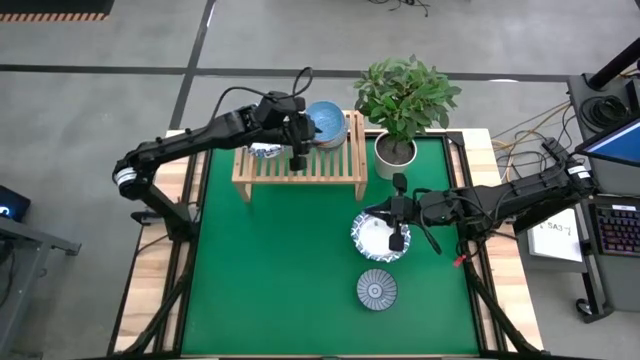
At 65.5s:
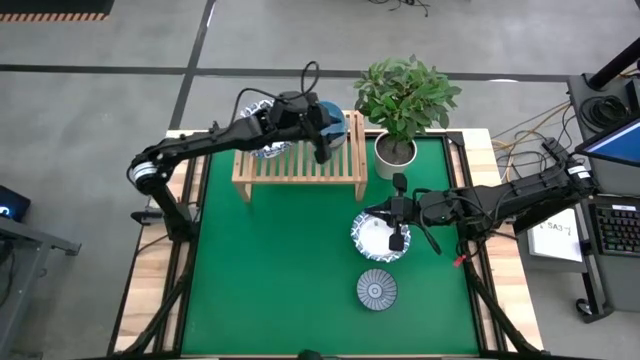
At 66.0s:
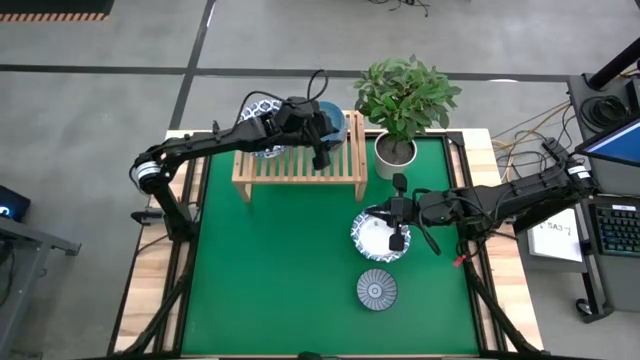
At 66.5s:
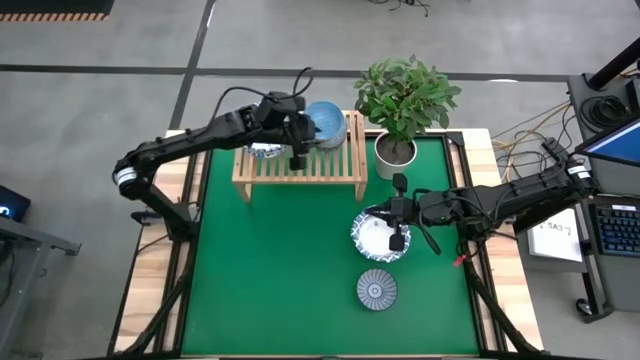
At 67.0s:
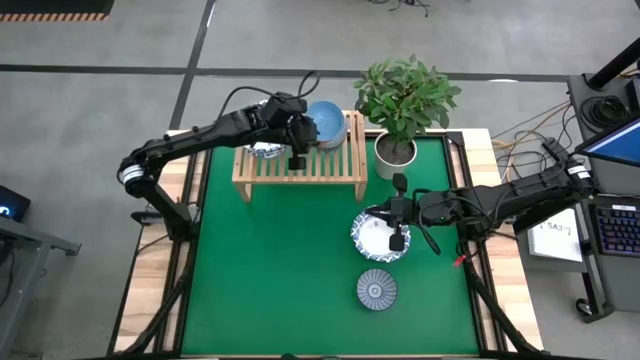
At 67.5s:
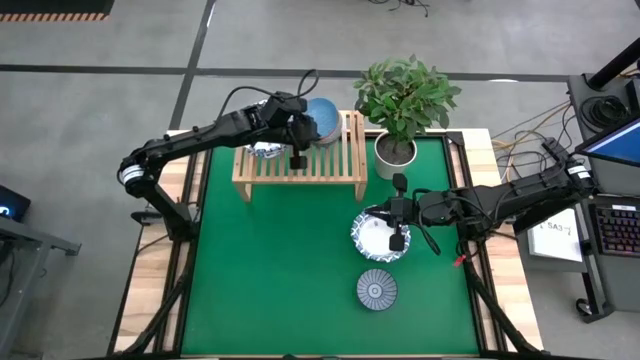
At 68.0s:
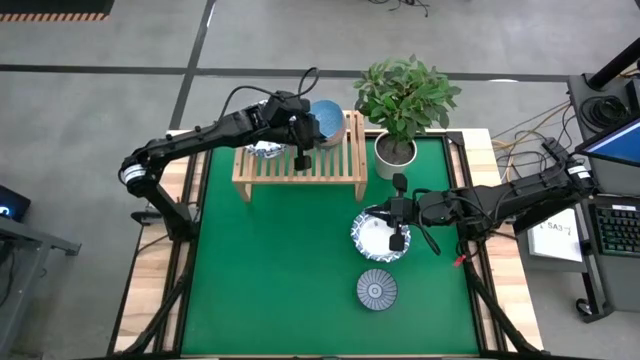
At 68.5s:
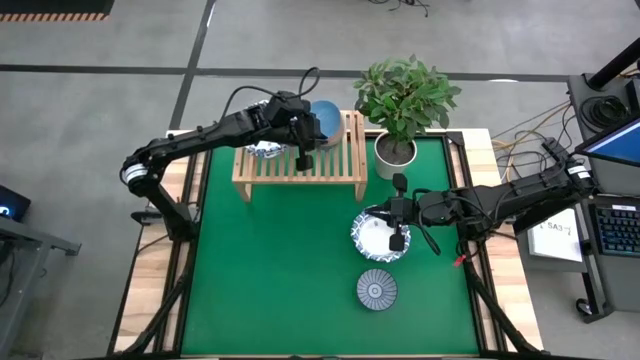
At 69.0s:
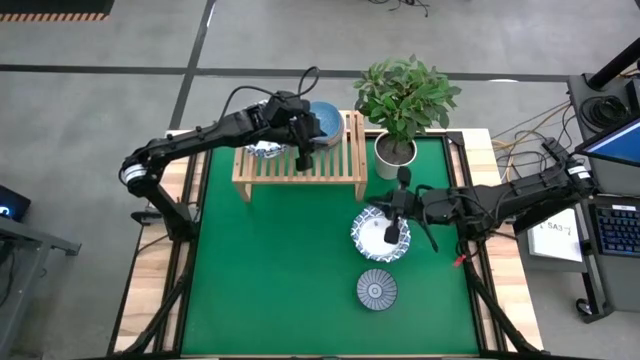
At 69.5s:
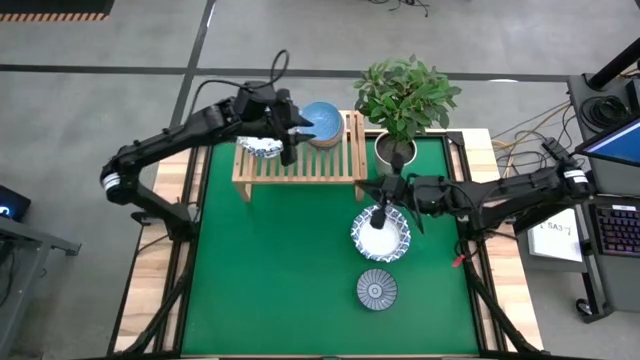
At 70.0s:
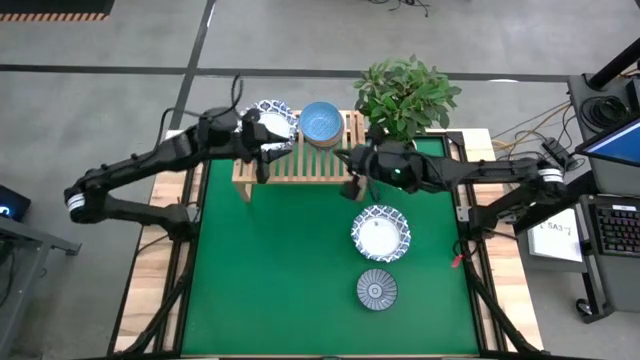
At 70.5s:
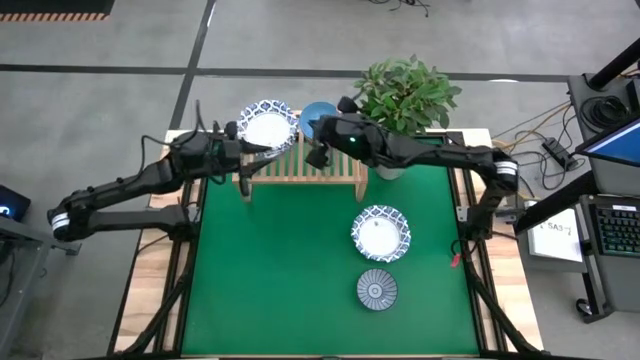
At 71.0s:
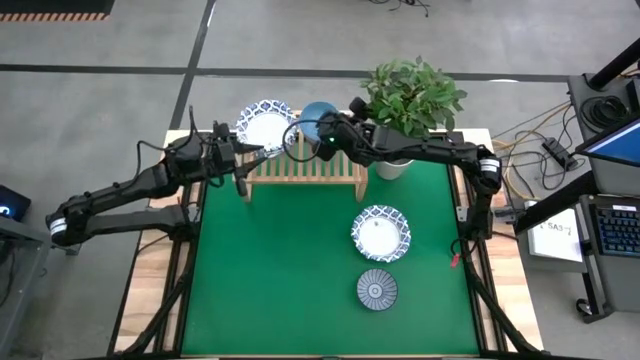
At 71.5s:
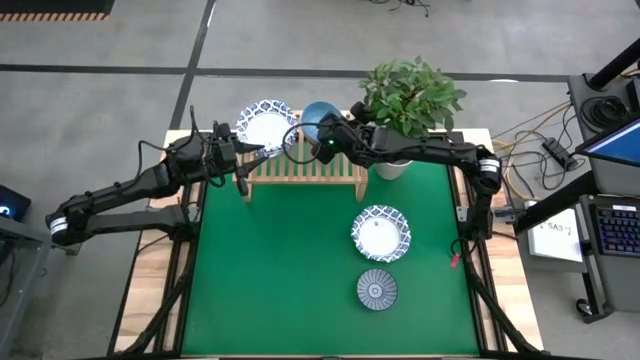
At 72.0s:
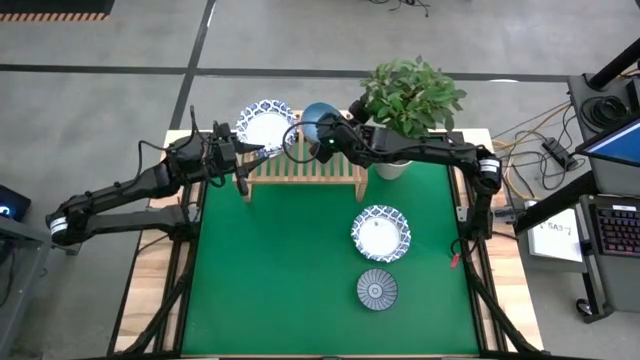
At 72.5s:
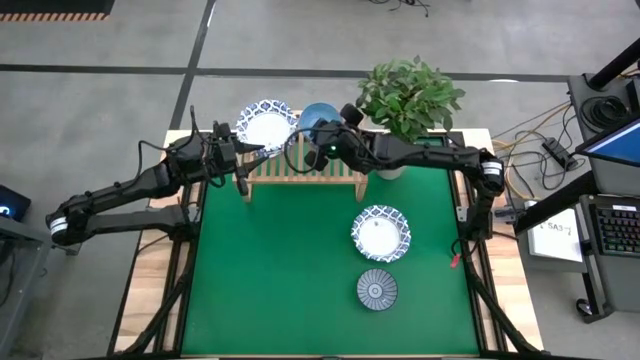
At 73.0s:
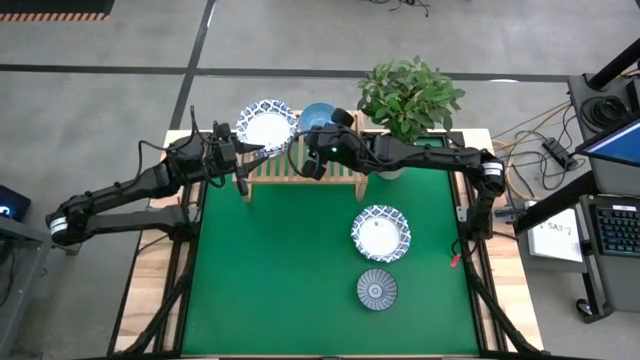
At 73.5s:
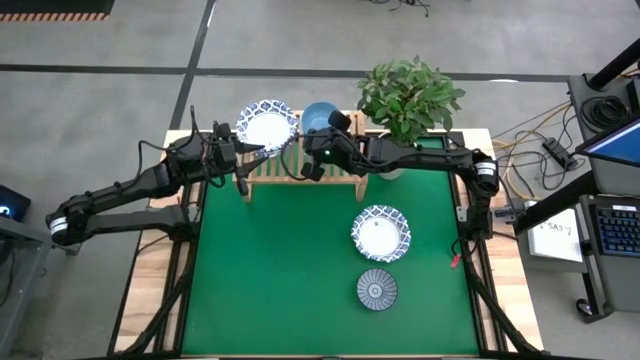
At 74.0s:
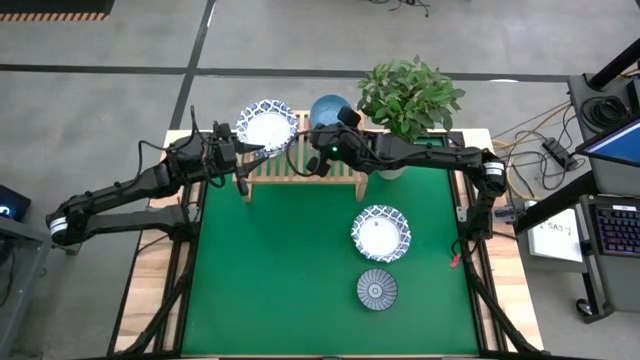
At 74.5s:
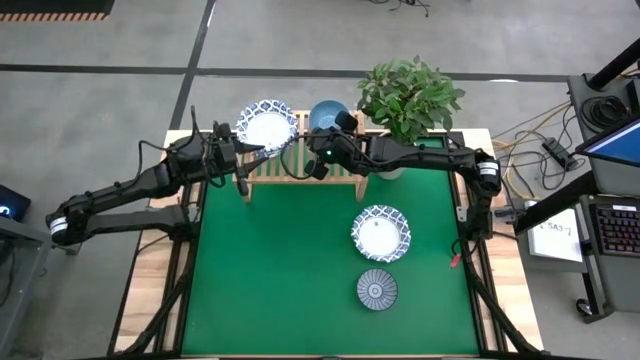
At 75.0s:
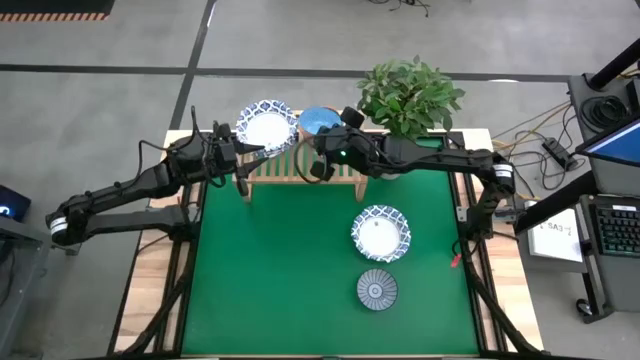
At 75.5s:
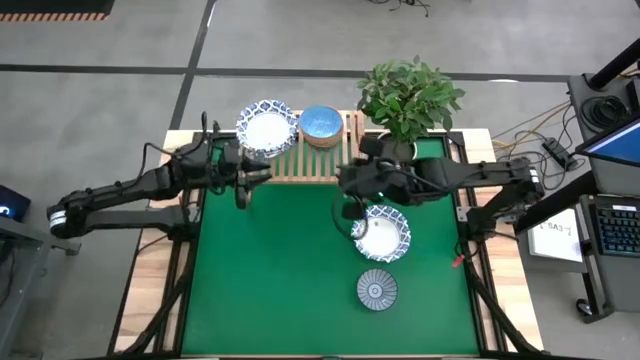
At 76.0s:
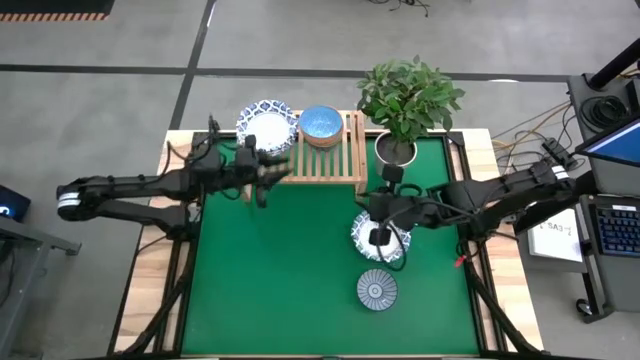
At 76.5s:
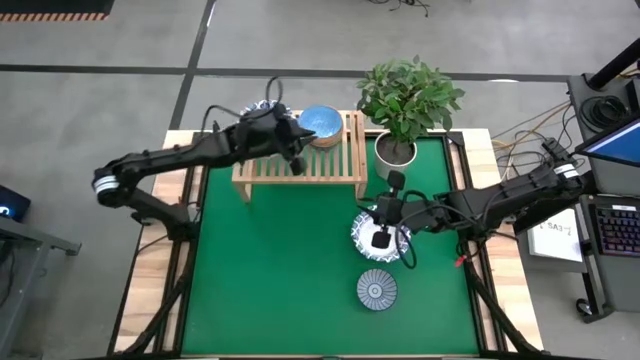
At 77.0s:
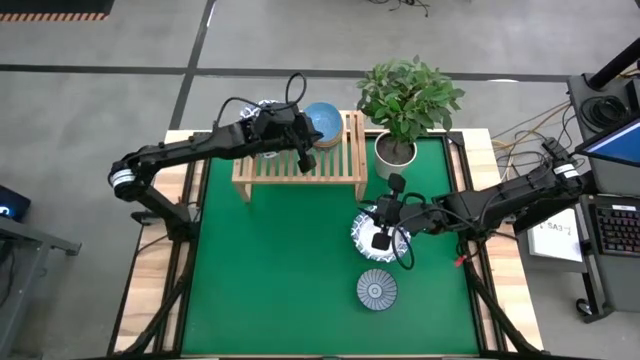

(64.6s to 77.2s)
Task: Place and stack bowls onto a shelf
Stack the light blue bowl on top of the orange bowl on the shelf

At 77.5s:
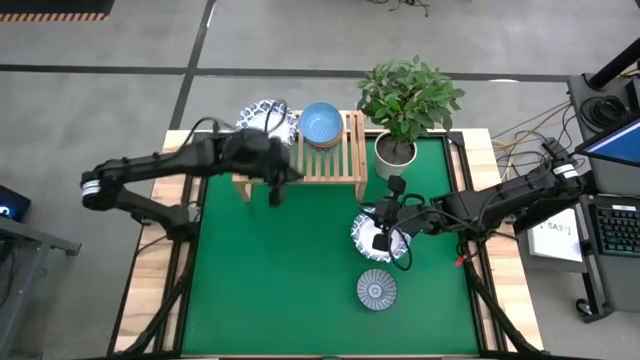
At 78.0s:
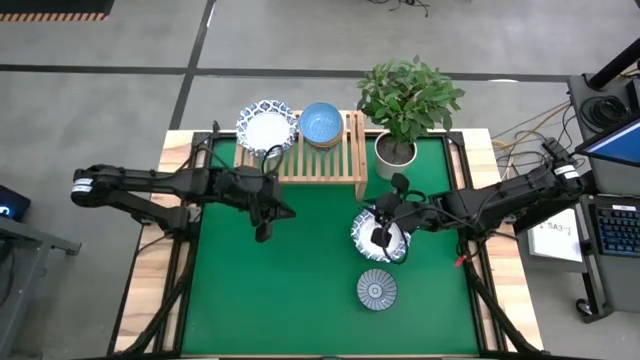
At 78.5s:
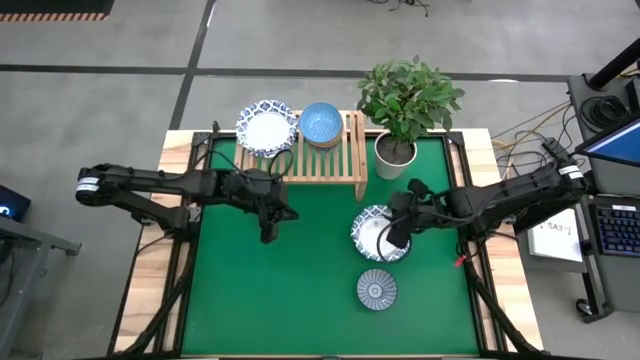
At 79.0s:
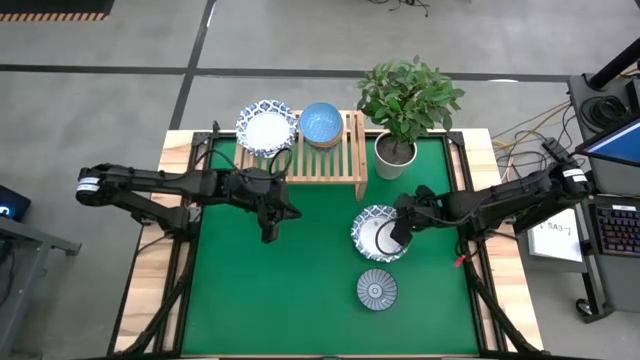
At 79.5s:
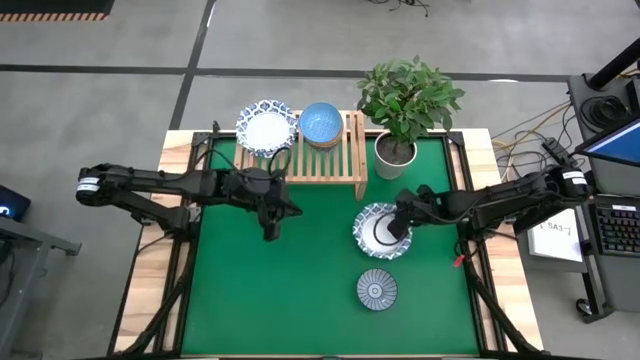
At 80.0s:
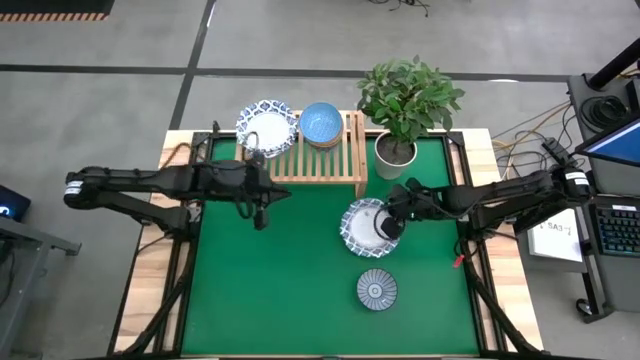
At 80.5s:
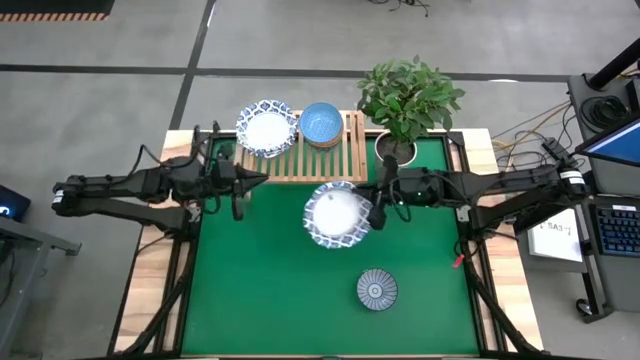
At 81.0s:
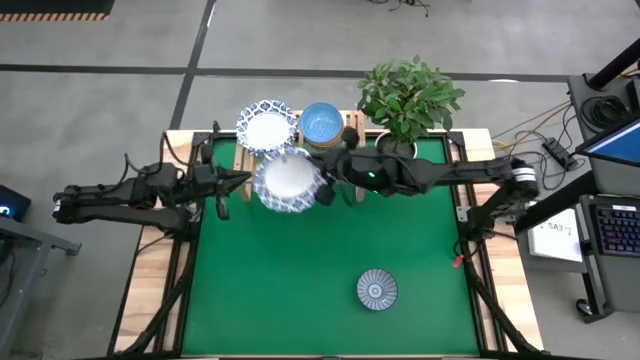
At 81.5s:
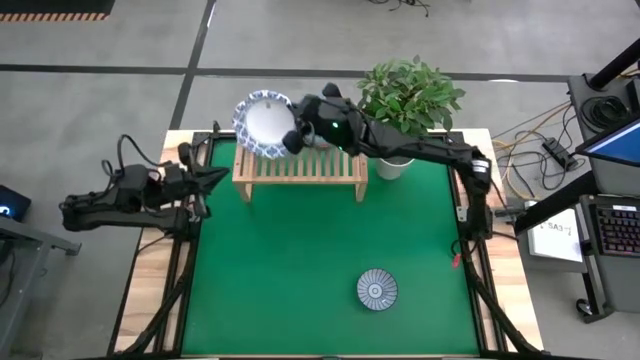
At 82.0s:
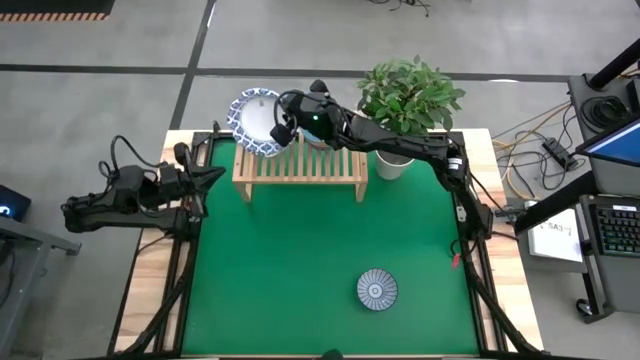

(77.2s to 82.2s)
Stack the white bowl on top of the other white bowl on the shelf

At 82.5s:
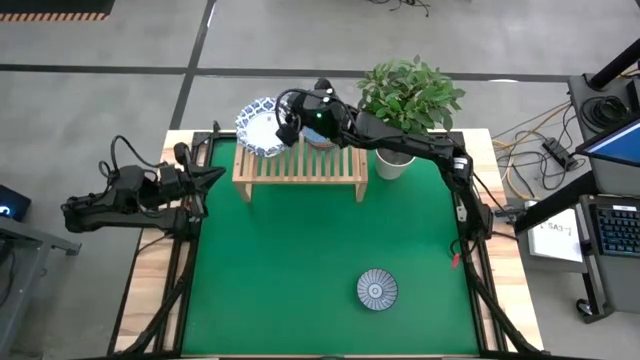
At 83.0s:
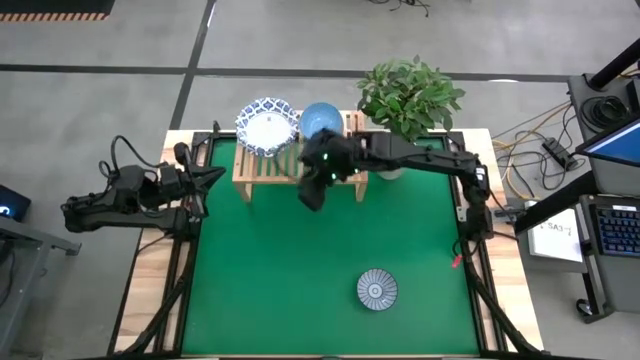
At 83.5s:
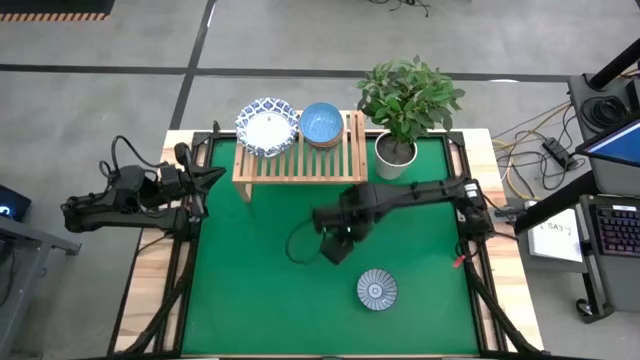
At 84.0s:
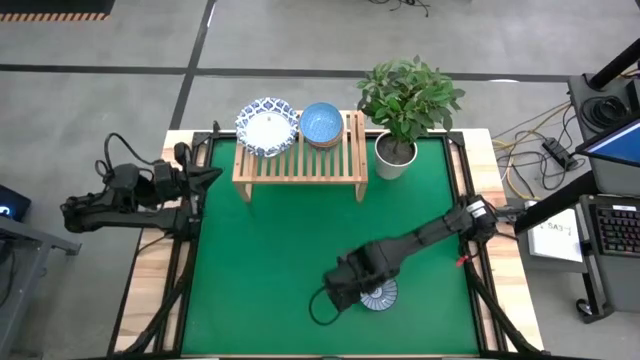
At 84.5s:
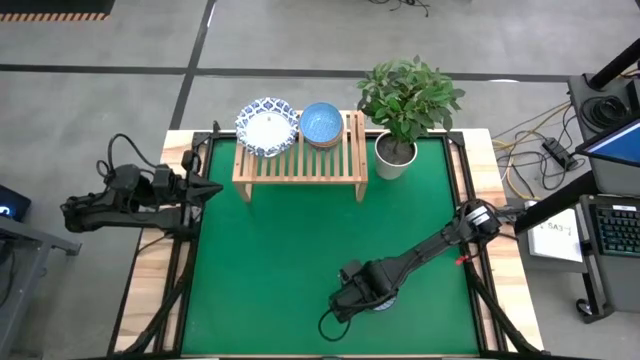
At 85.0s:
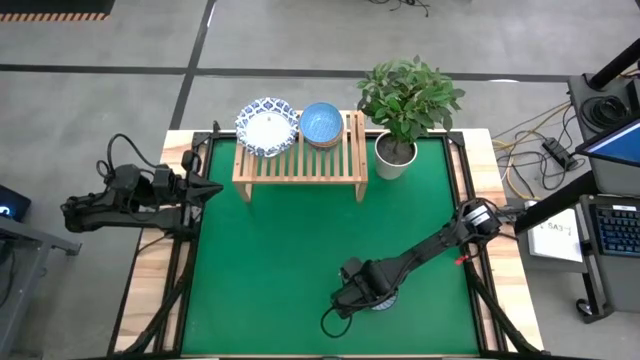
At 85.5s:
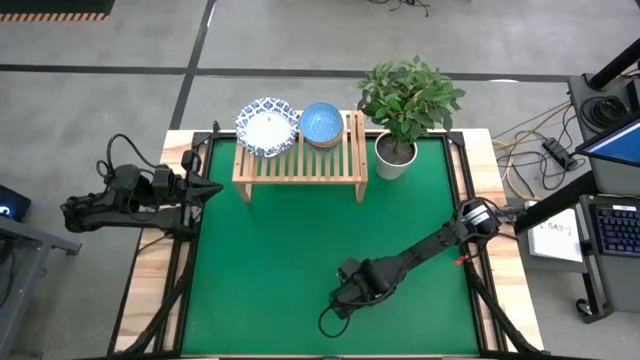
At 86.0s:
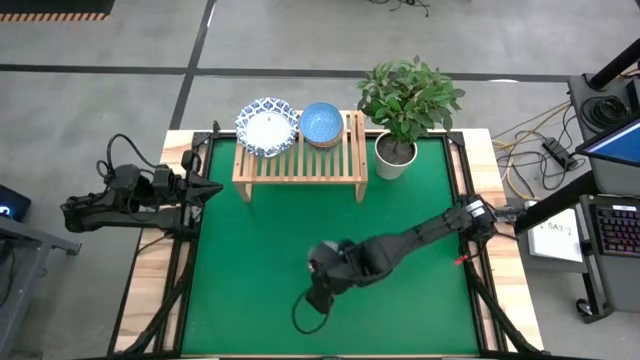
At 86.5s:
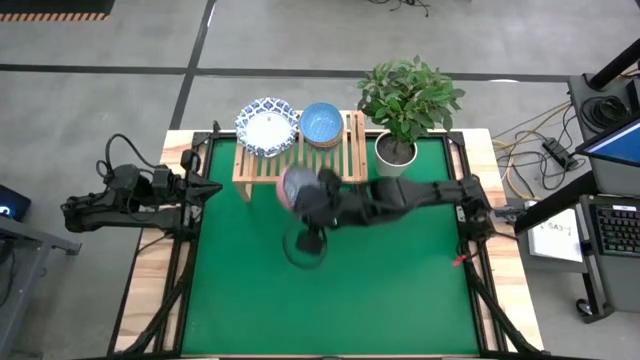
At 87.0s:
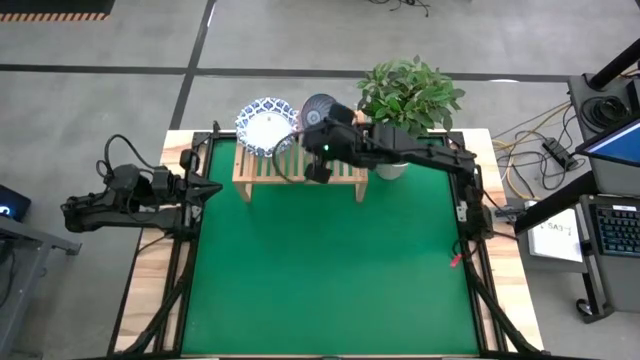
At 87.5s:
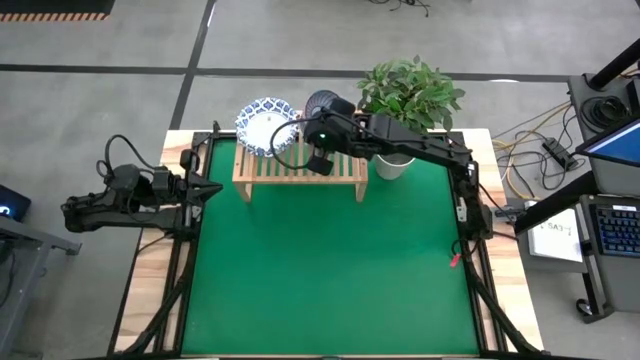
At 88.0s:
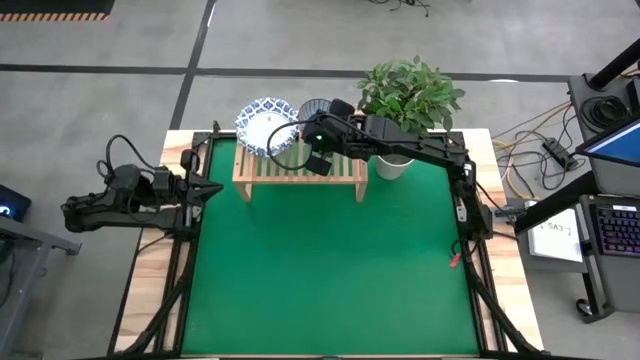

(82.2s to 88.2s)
Stack the blue bowl on top of the light blue bowl on the shelf
